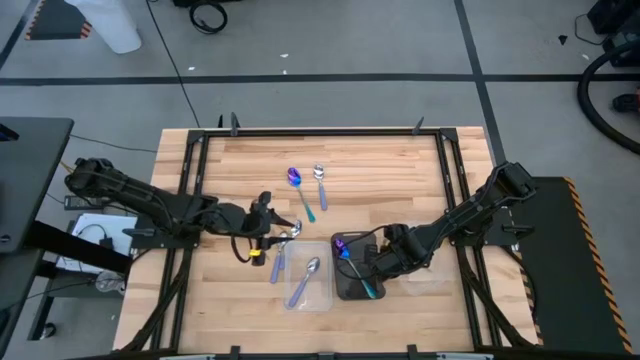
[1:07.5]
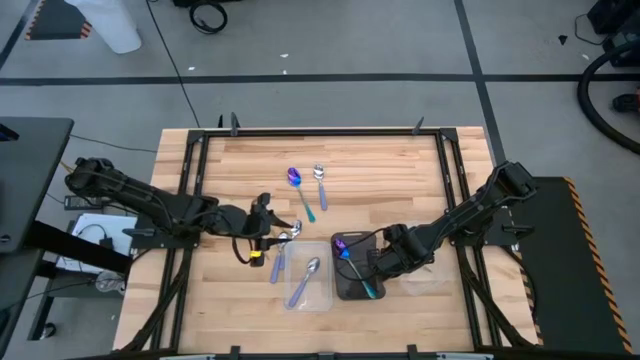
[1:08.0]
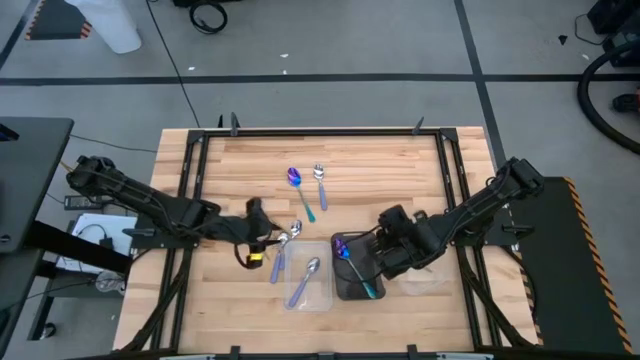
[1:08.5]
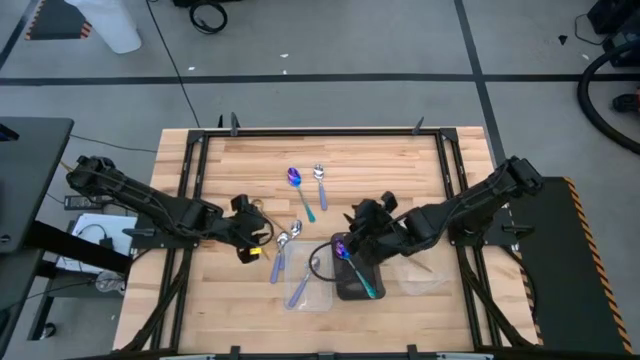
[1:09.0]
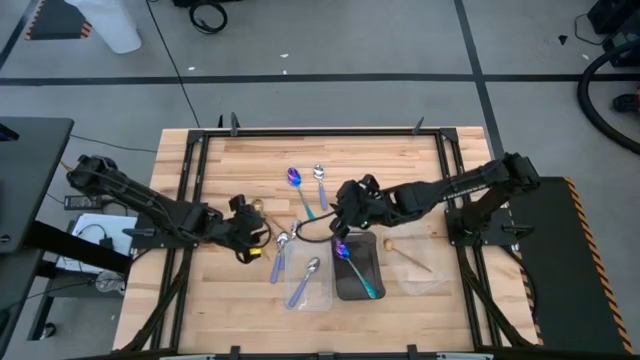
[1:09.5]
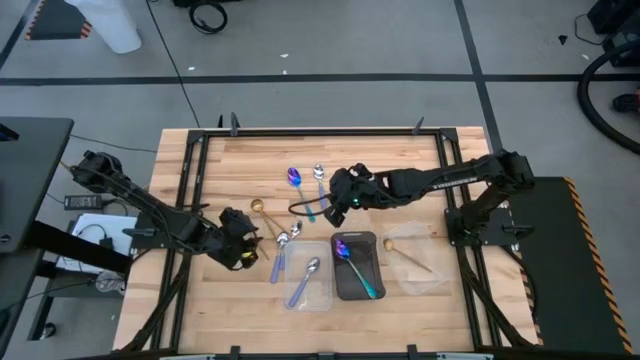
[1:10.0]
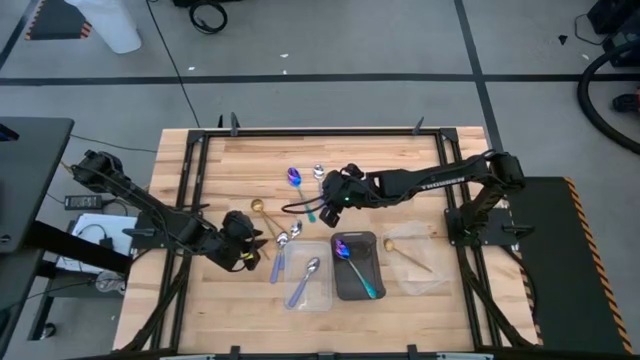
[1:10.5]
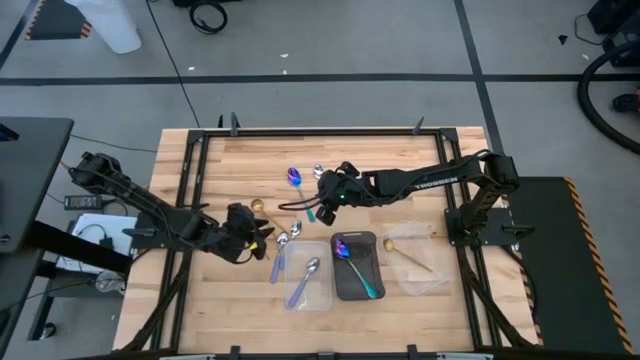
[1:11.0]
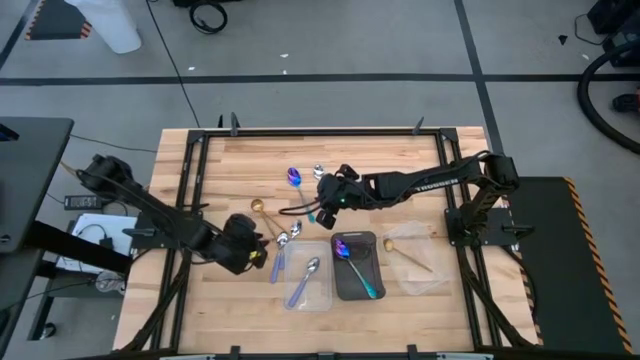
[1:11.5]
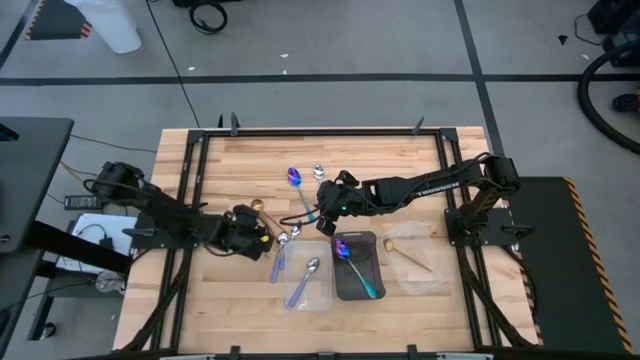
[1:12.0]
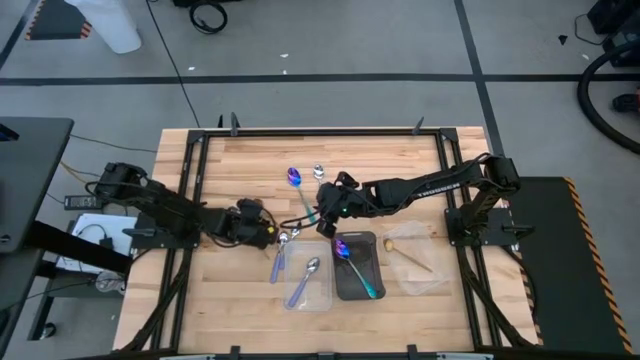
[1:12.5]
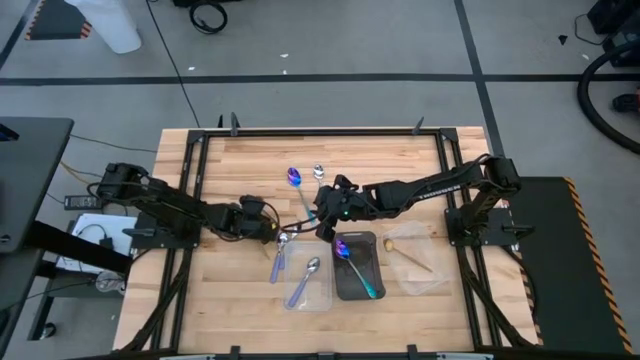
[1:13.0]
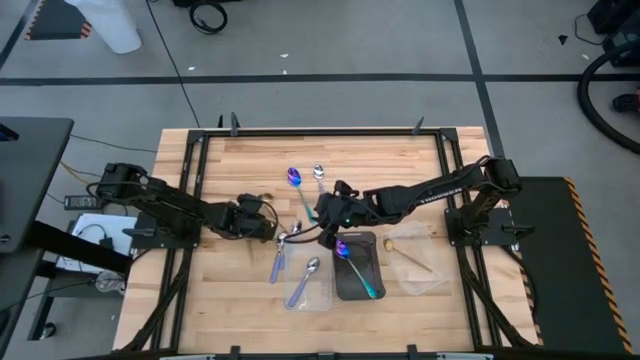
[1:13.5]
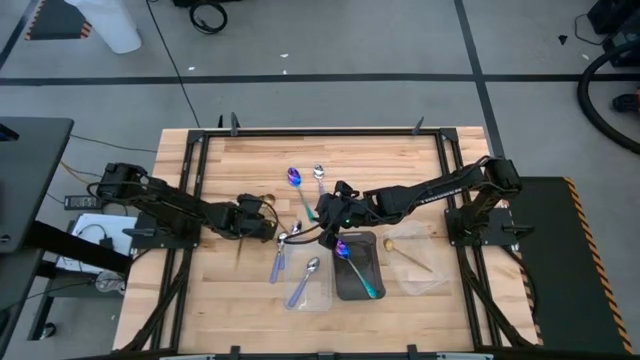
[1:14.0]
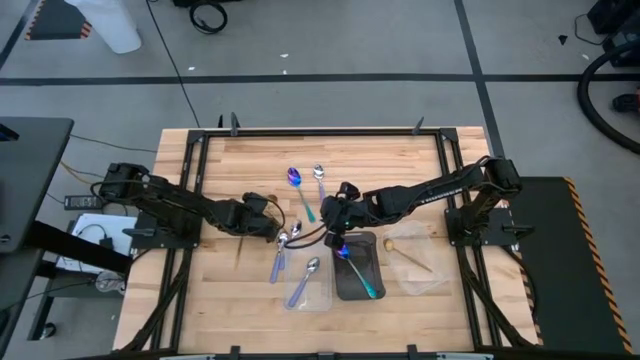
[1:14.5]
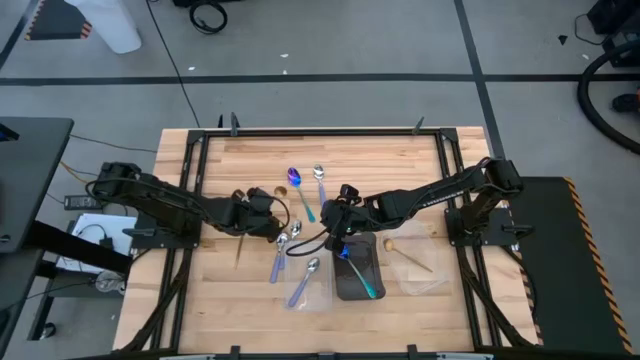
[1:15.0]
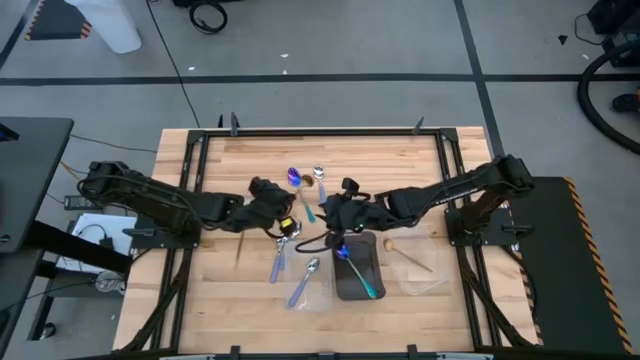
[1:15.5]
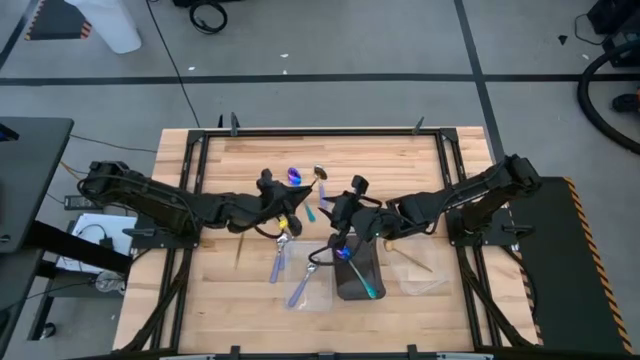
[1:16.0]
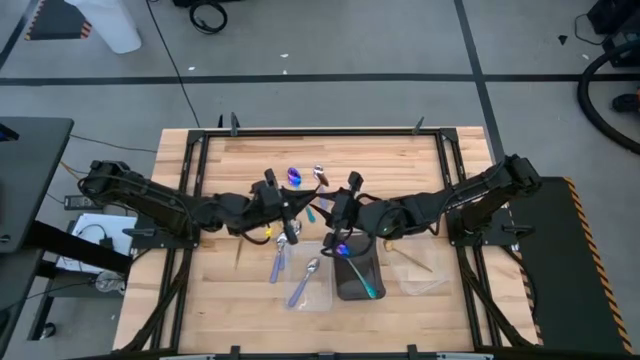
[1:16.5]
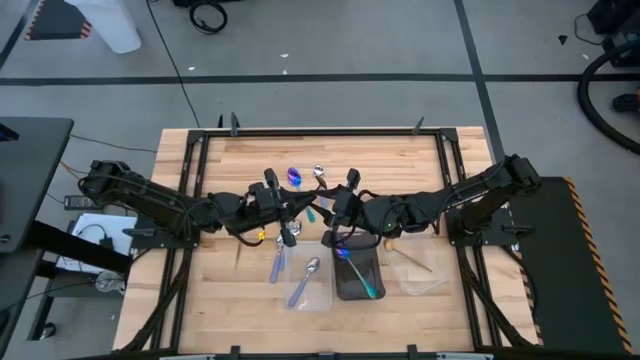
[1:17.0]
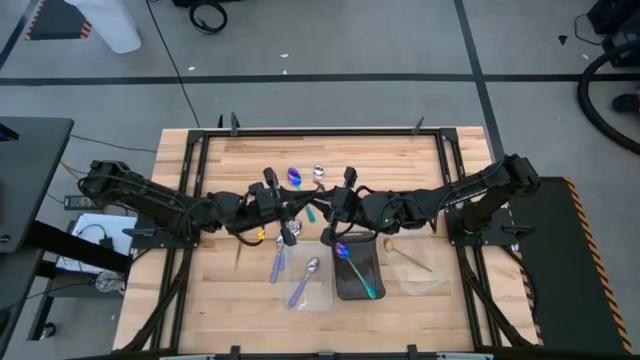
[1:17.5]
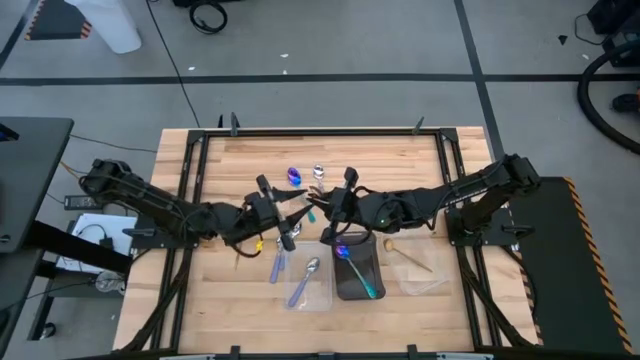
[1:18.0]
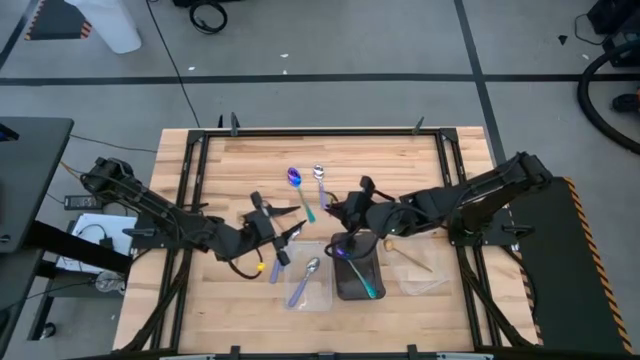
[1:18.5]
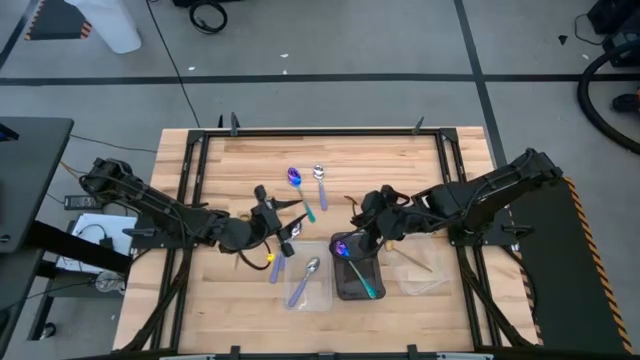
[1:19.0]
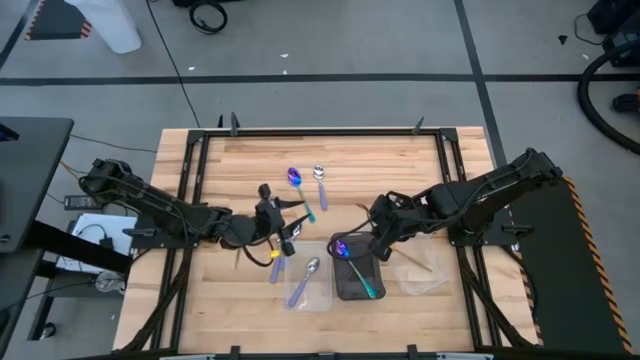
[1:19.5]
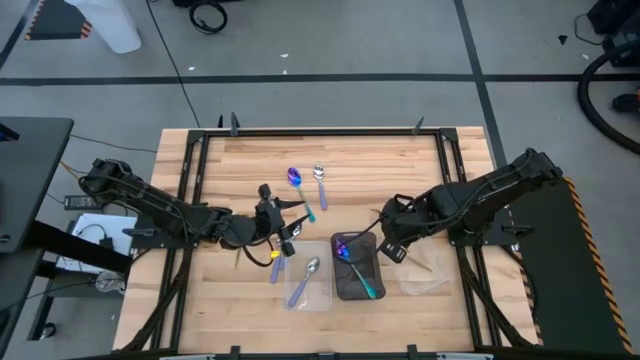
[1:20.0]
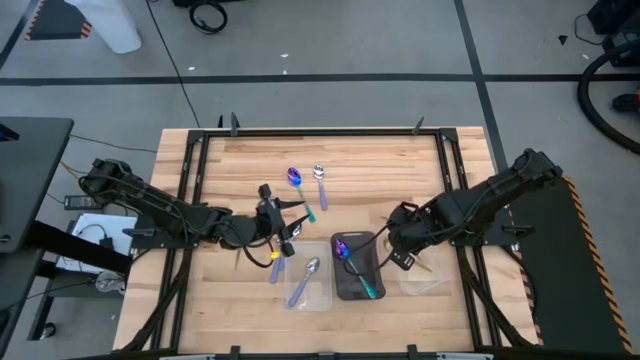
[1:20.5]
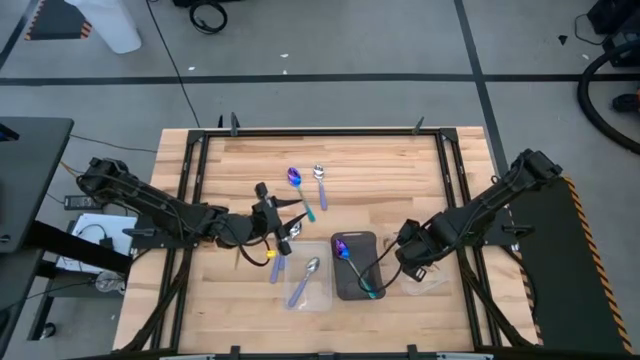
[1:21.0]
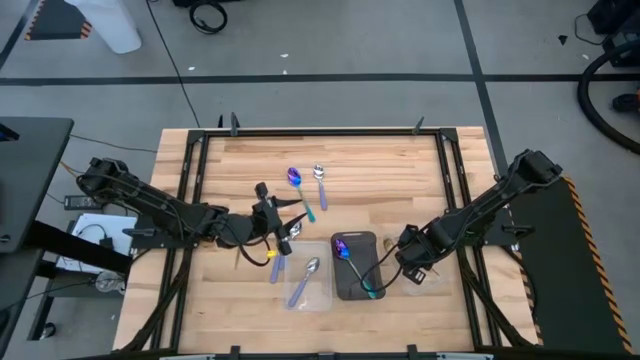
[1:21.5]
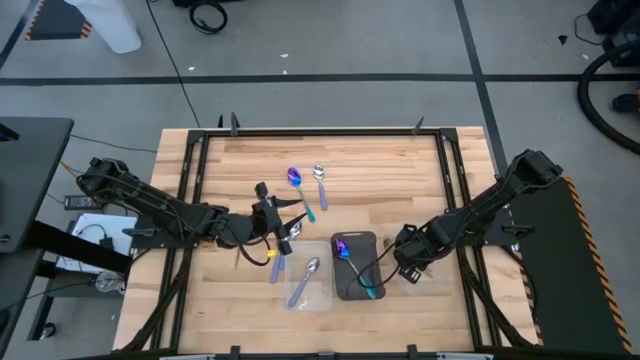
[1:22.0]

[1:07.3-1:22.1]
Task: Sort silverware by color (type)
Put the gold spoon into the right transparent bin

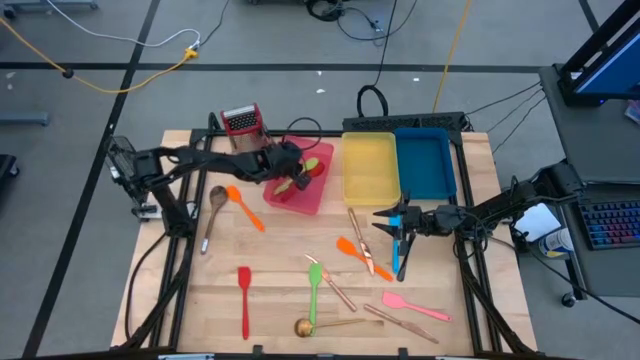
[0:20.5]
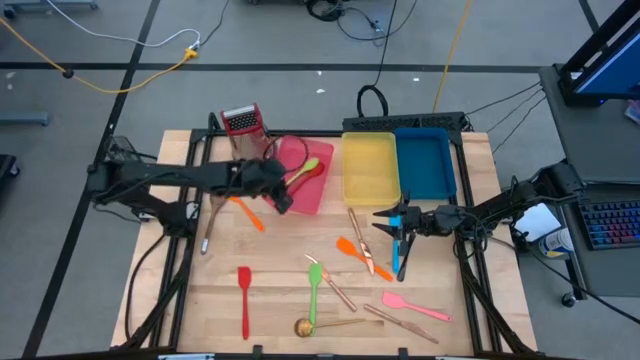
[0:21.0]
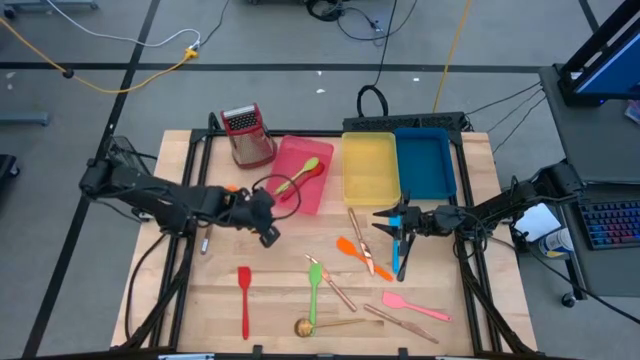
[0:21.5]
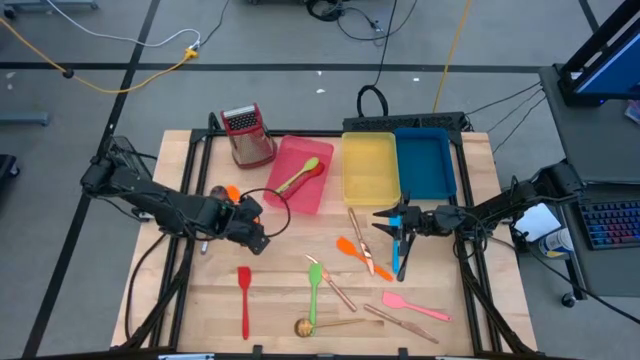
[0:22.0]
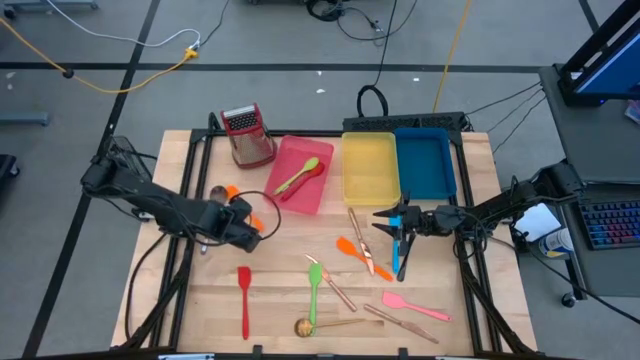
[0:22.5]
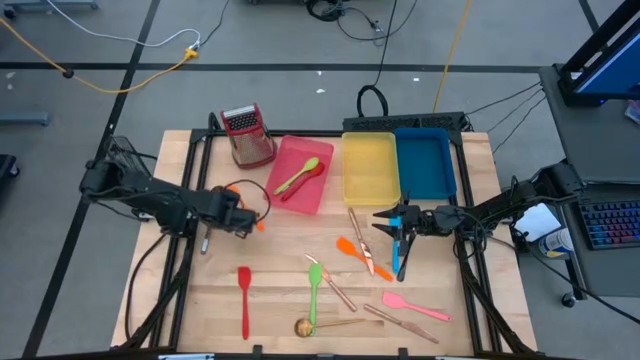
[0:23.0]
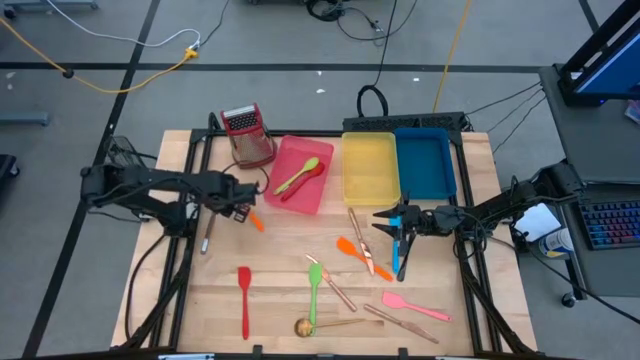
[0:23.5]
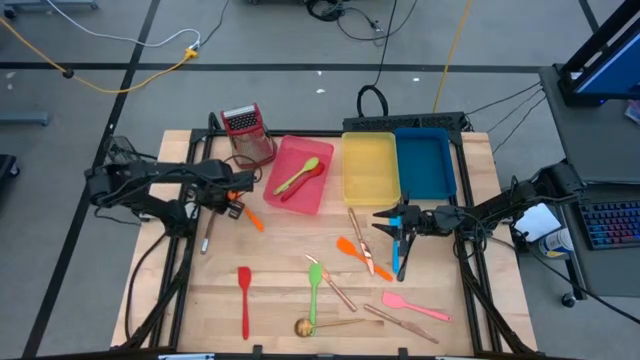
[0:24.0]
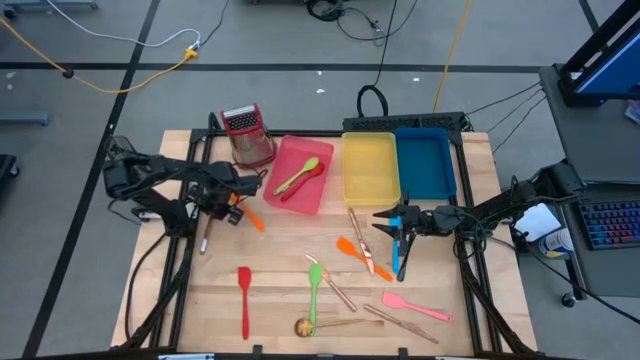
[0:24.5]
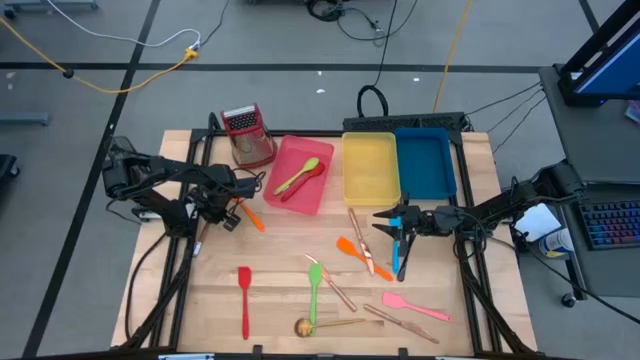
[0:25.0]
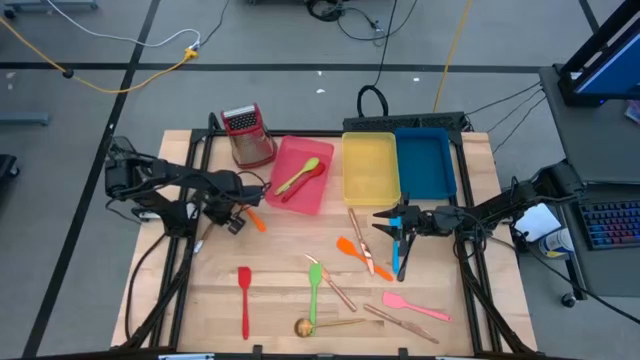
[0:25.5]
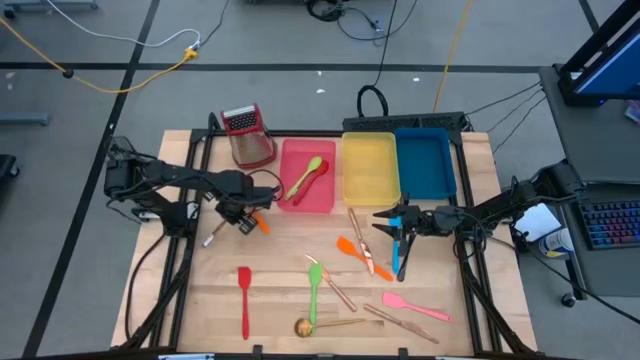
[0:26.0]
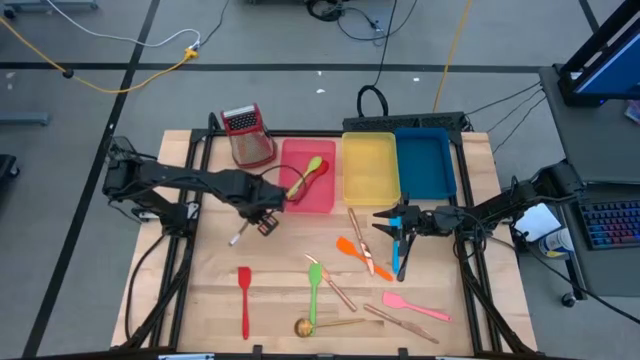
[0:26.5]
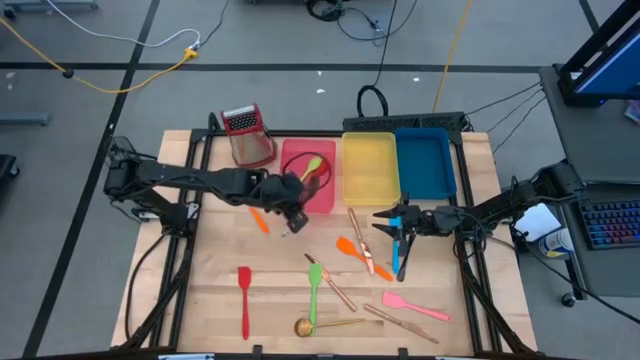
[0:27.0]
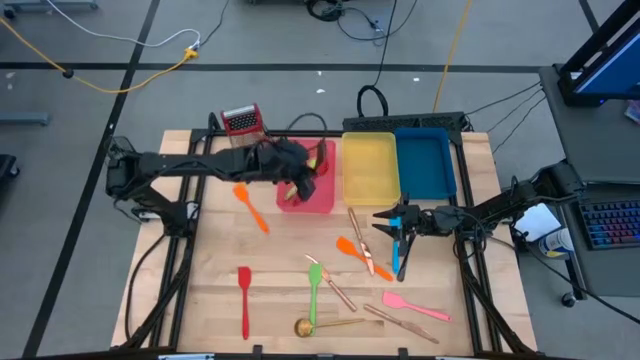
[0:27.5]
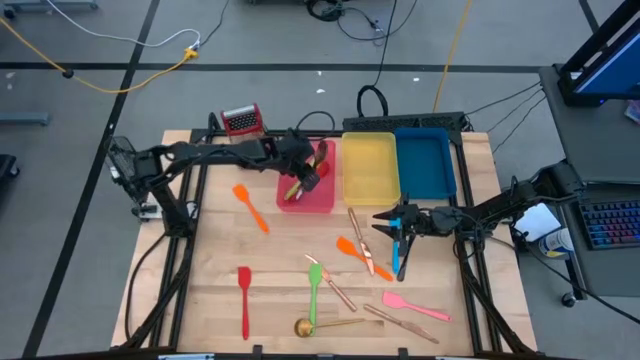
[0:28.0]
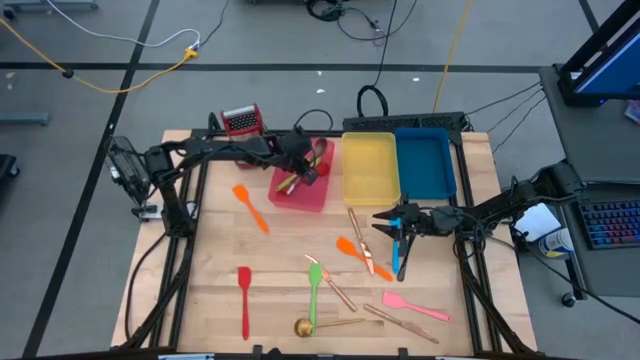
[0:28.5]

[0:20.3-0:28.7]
Task: Pick & Place Kitchen Items
Put the brown serving spoon into the red bin
